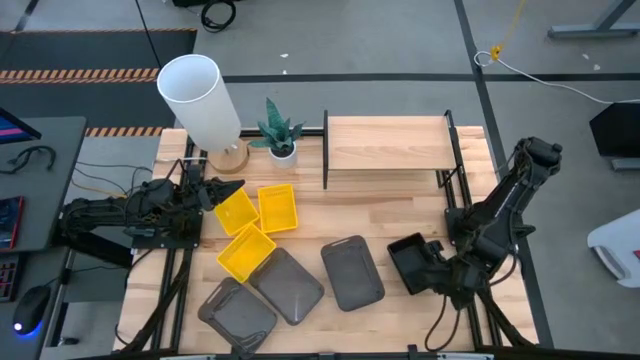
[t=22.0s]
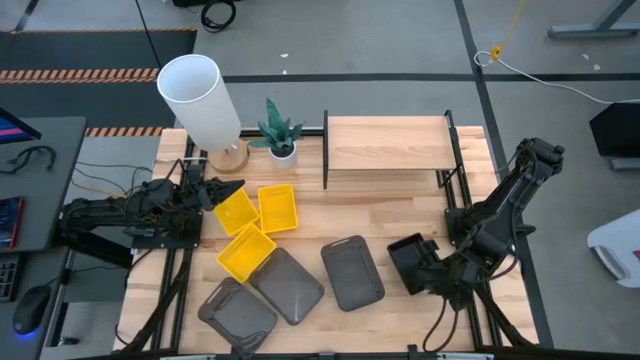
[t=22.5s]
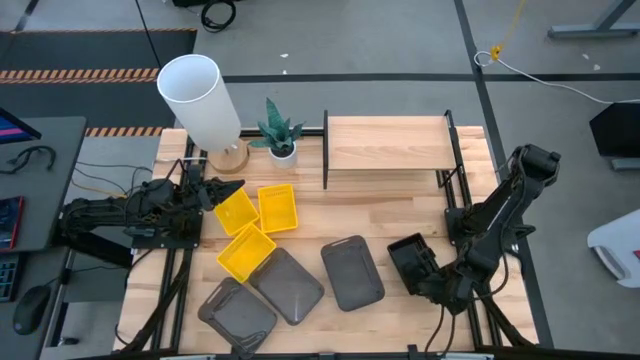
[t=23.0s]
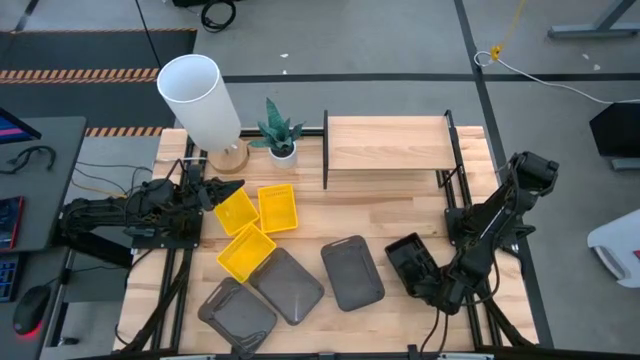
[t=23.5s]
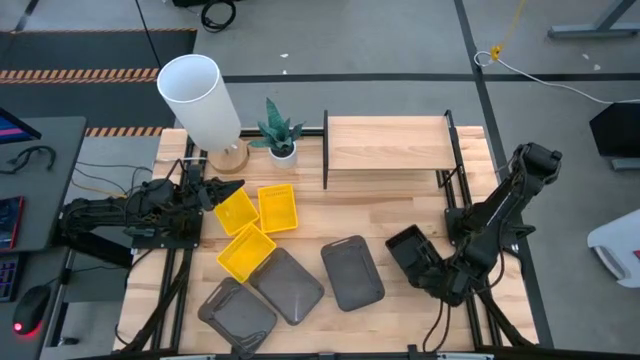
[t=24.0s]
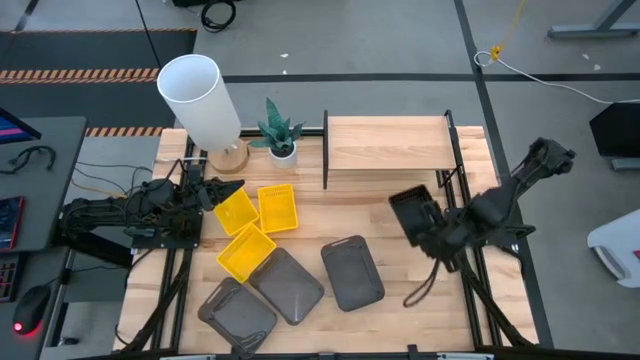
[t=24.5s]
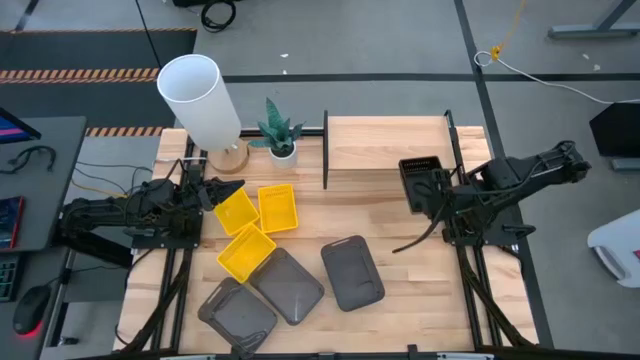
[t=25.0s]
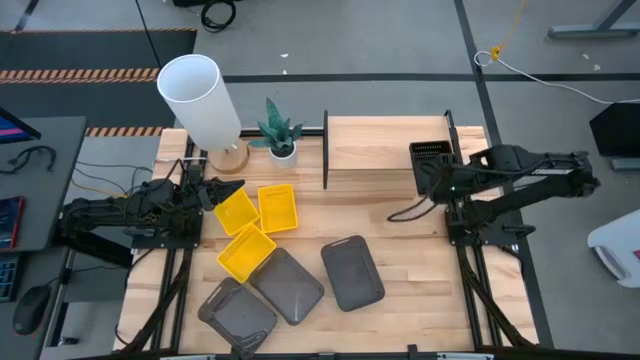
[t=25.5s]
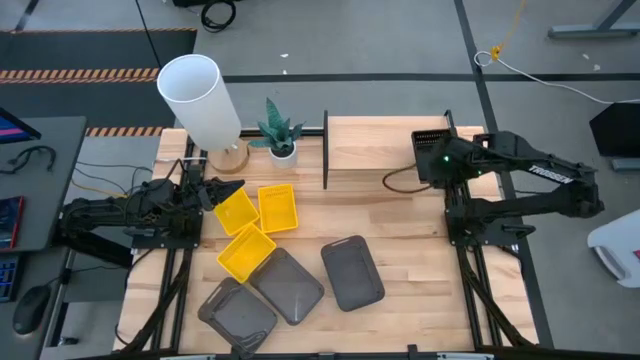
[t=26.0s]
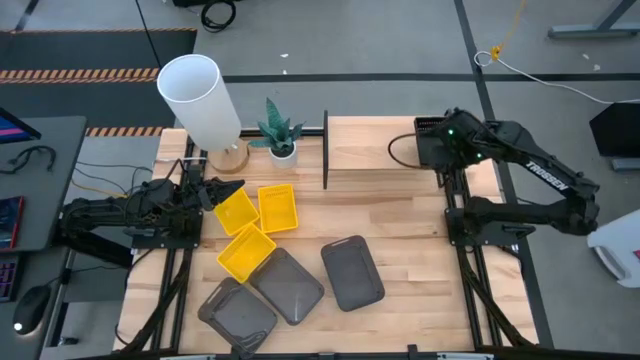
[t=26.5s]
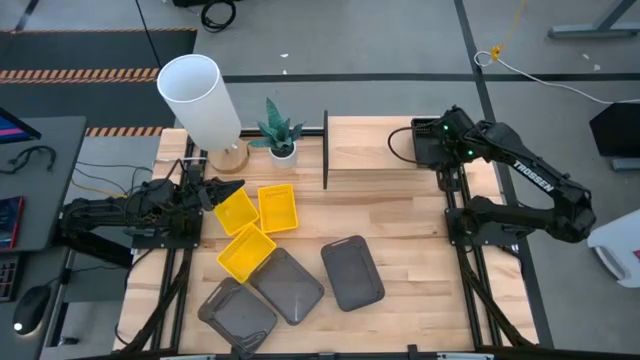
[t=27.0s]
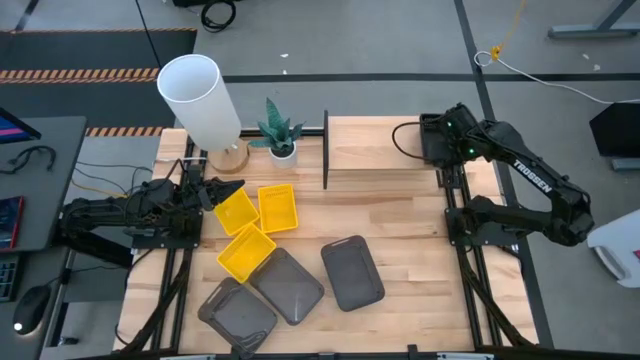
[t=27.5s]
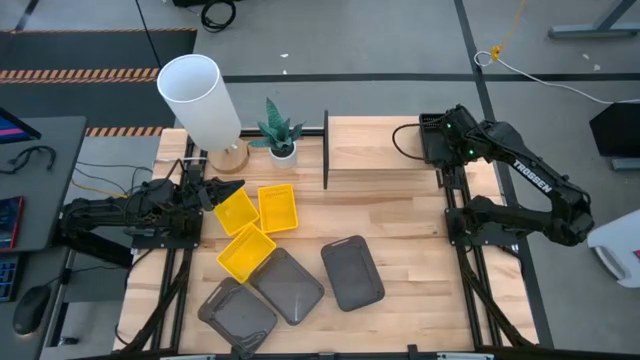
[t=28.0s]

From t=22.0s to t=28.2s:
Task: Stack baskets on shelf by color
Put the stacked black bins on the shelf

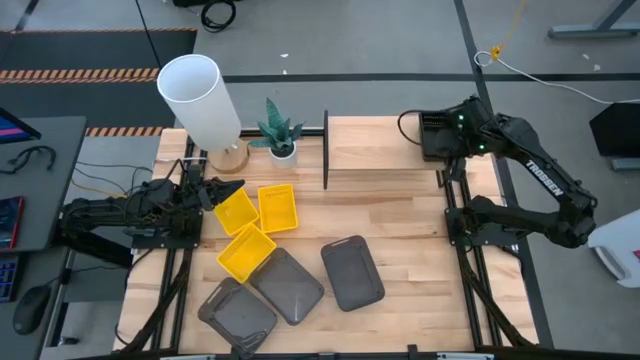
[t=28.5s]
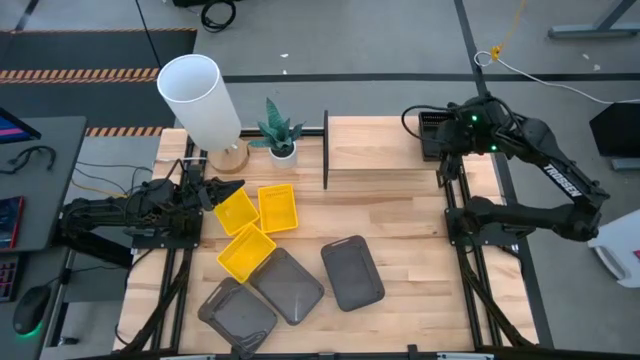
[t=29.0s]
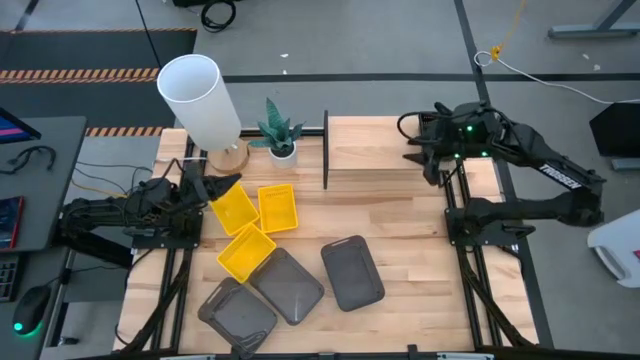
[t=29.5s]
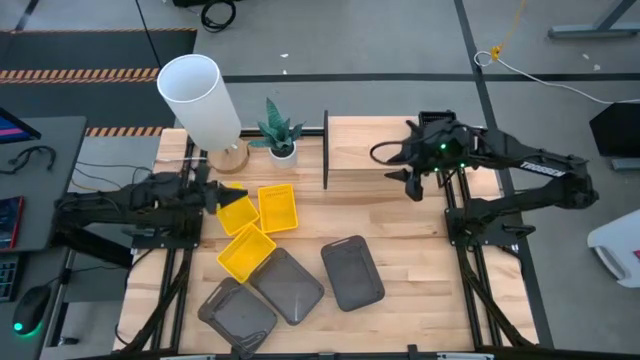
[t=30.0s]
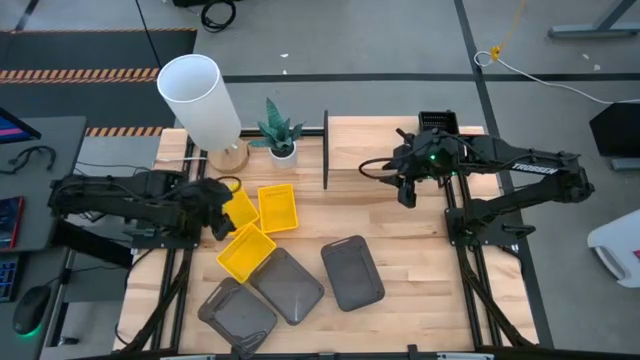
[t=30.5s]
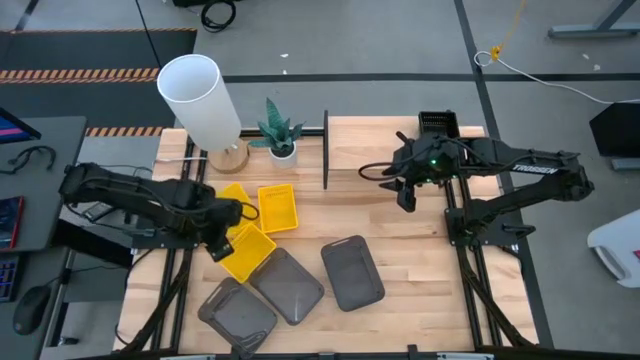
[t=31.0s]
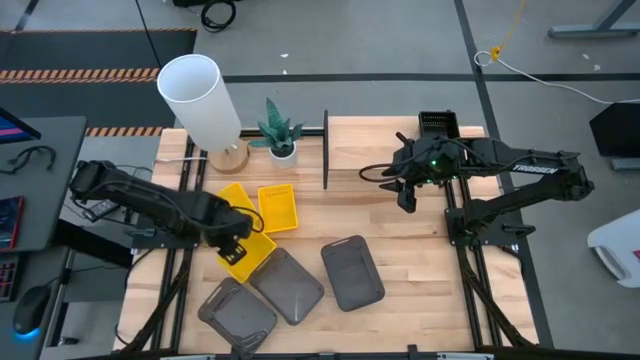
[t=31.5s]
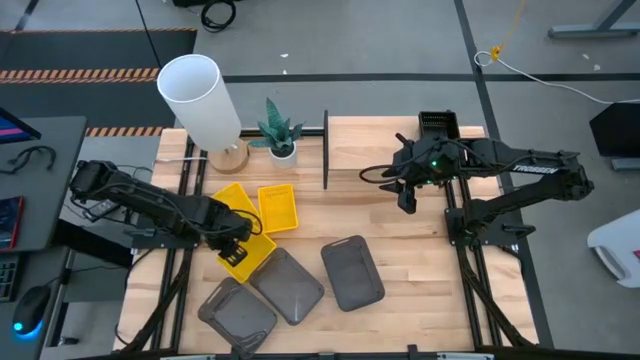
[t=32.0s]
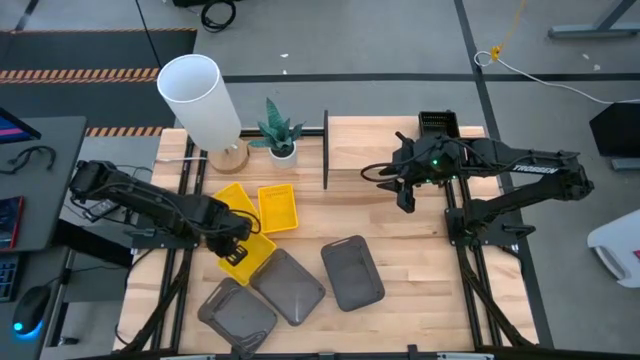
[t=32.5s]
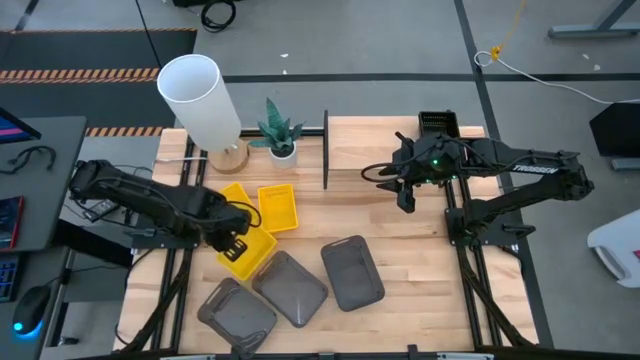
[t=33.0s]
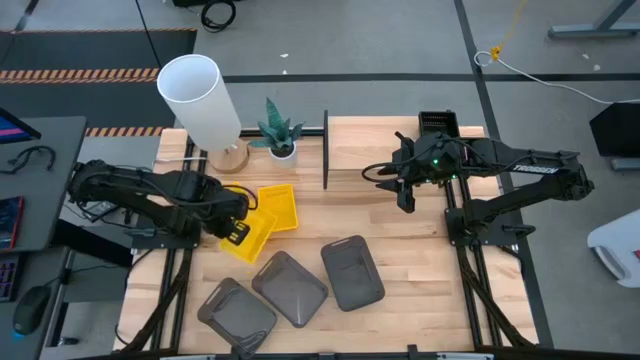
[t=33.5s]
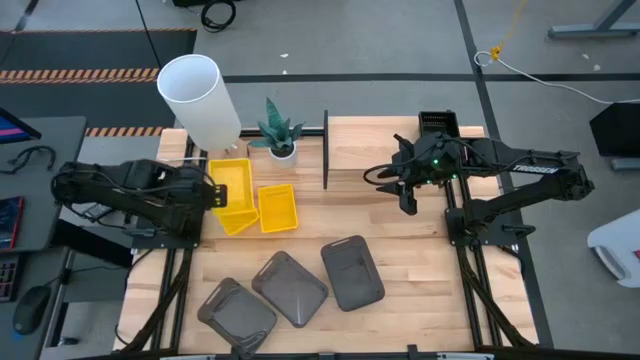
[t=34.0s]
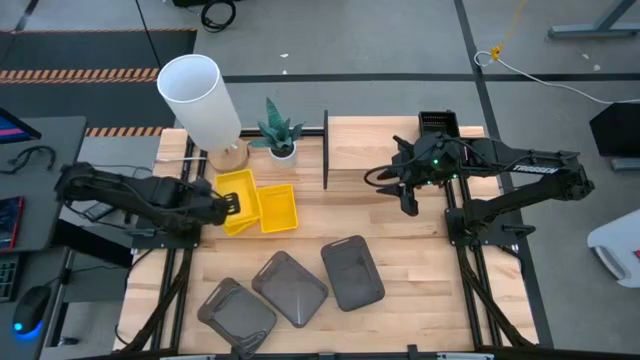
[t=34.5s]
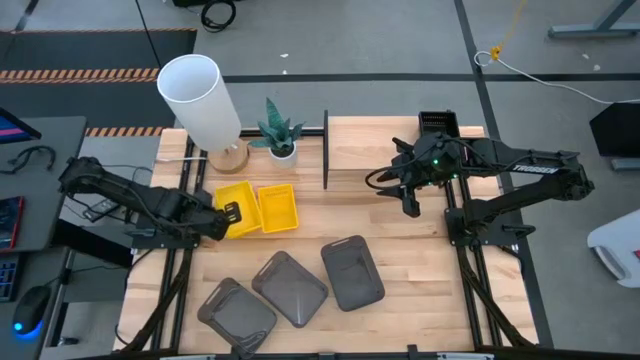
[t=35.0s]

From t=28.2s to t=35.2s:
Stack the bottom yellow bin on the left yellow bin

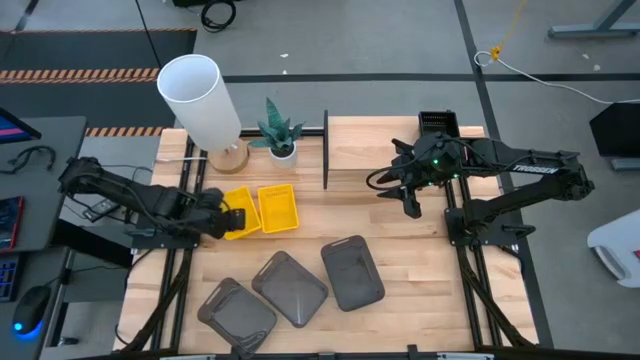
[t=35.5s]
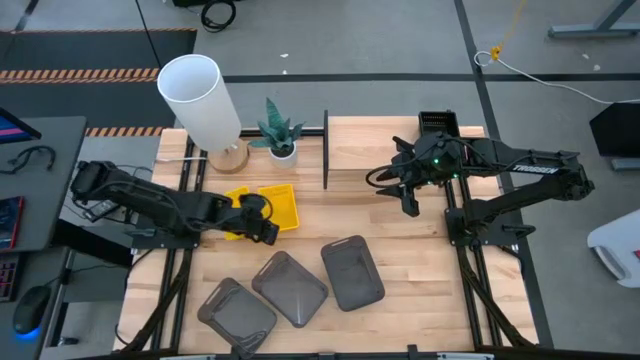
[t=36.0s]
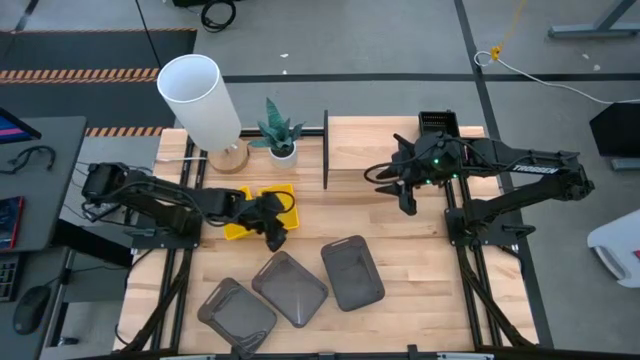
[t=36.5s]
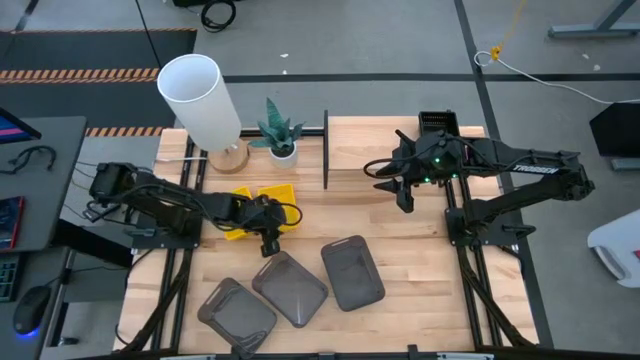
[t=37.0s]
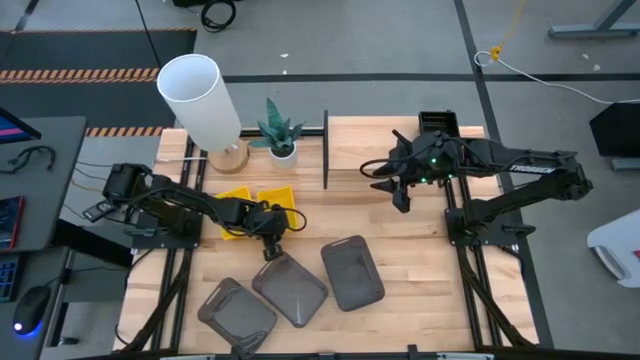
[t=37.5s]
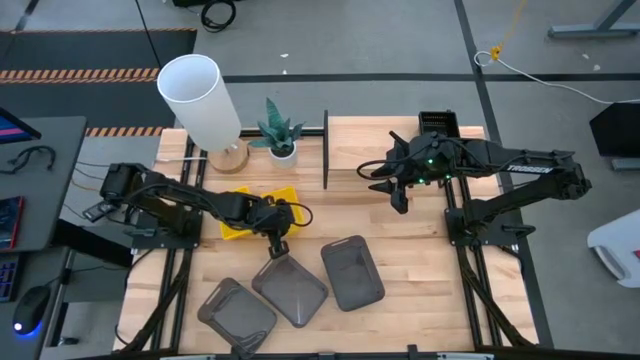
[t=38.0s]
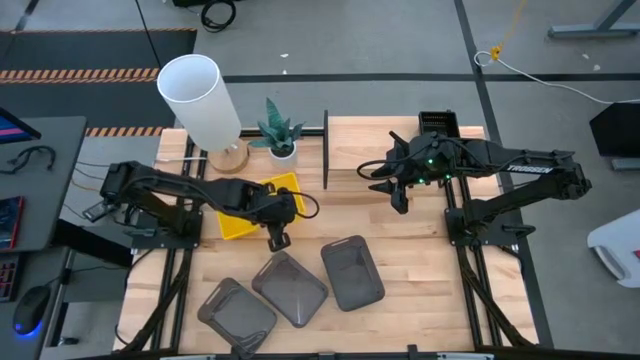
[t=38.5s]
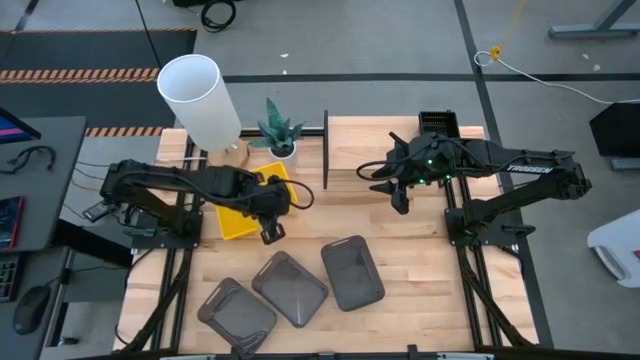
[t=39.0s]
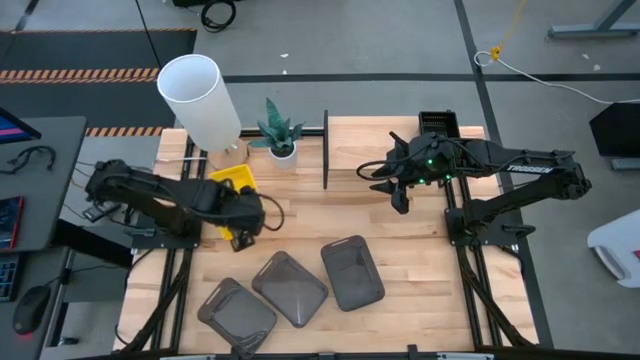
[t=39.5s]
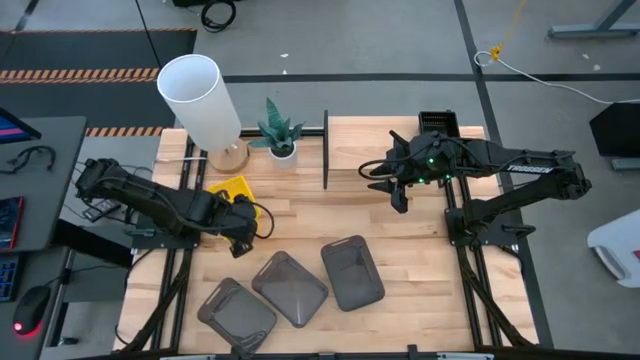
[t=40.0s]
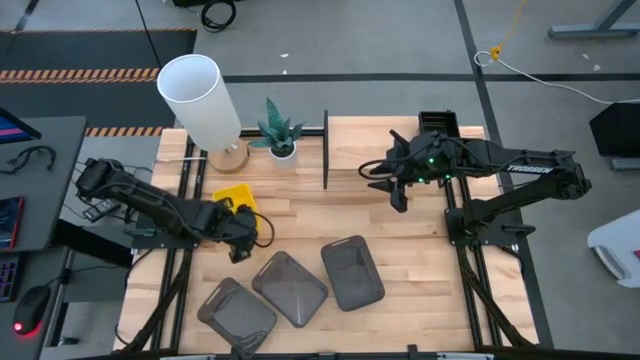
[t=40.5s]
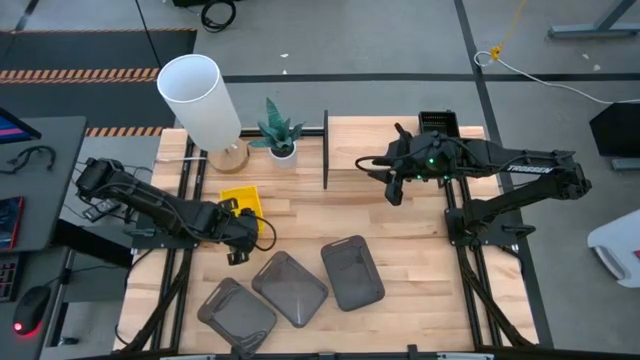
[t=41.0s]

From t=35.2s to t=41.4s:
Stack the yellow bin on the stacked yellow bin
